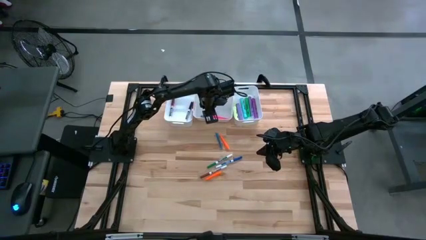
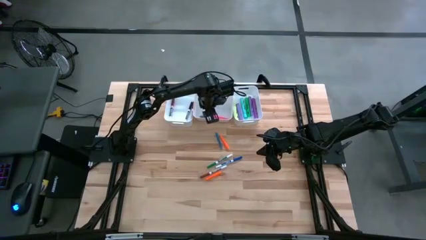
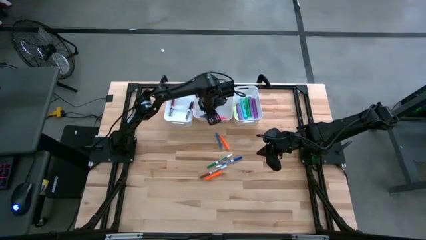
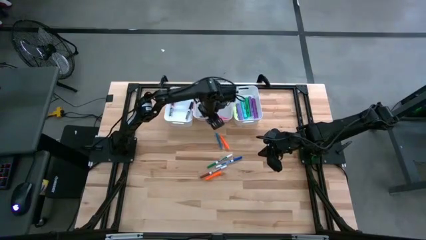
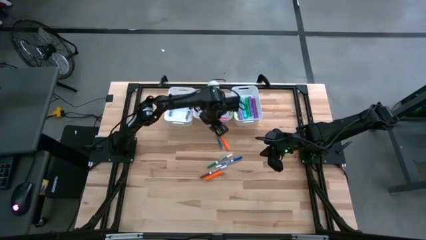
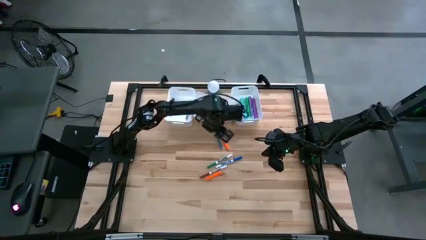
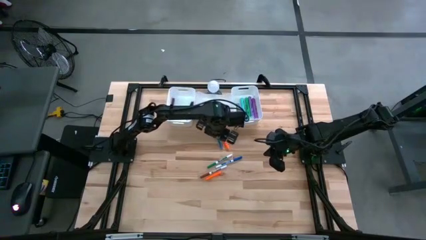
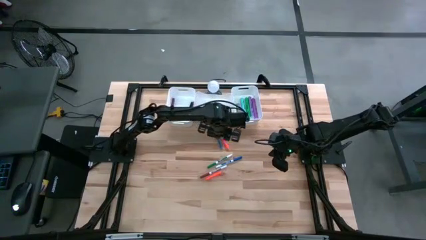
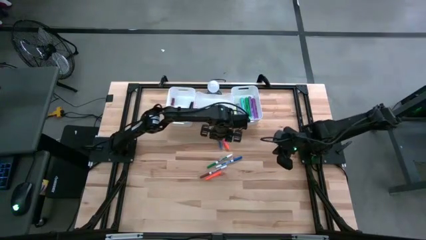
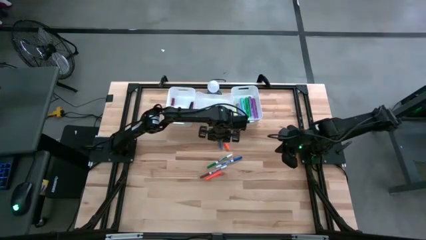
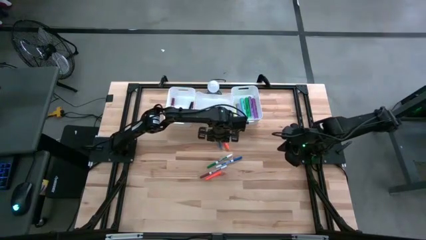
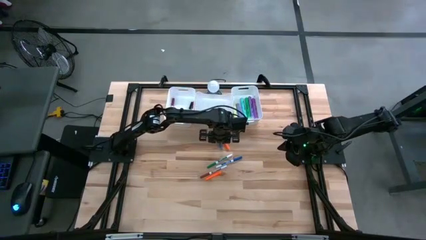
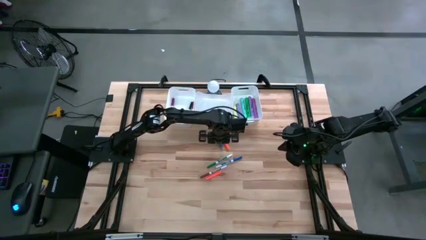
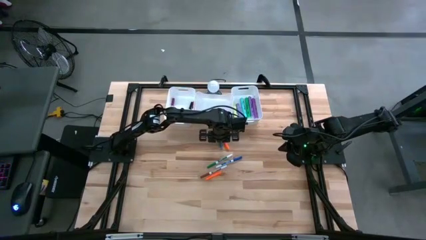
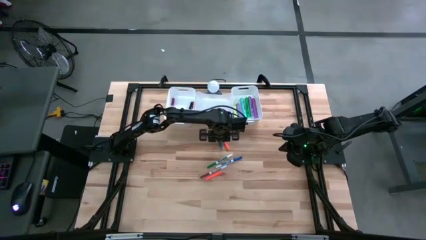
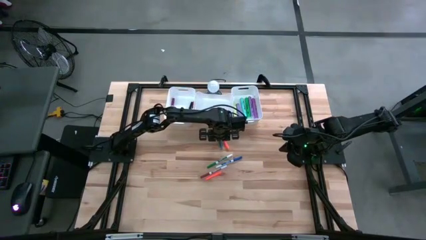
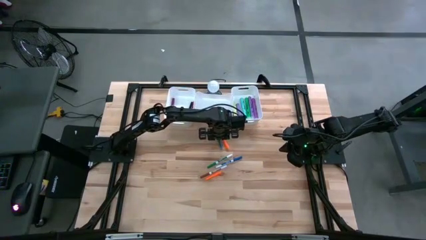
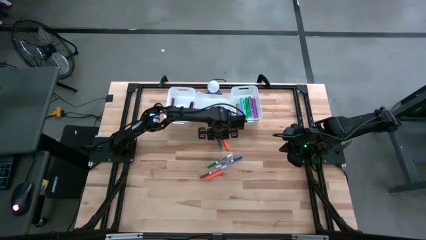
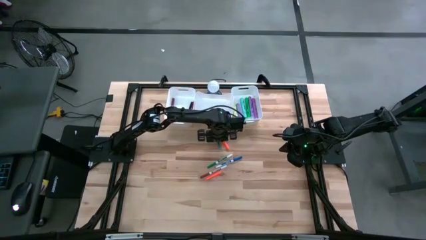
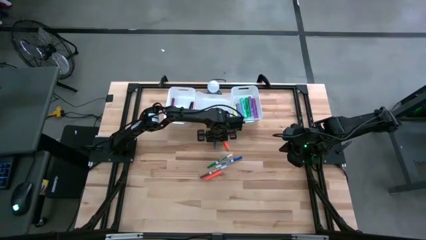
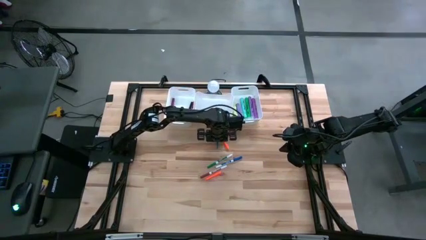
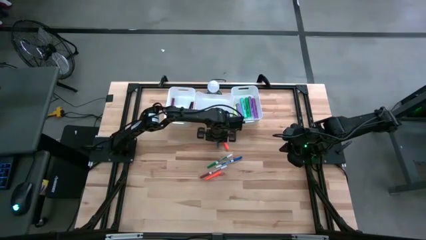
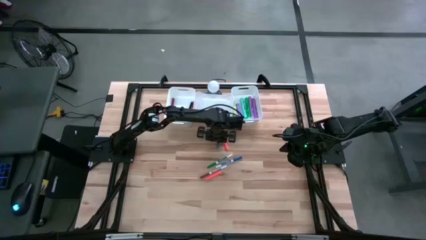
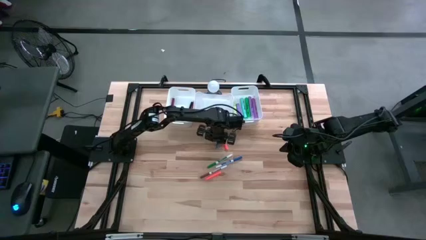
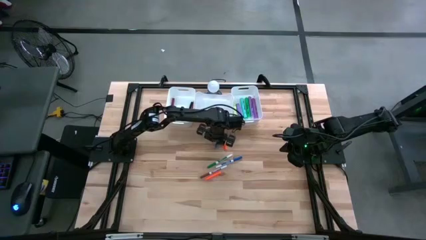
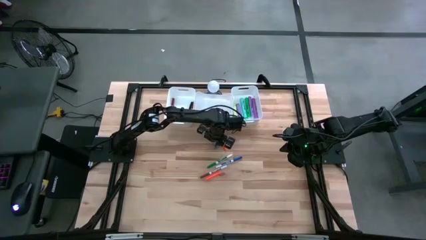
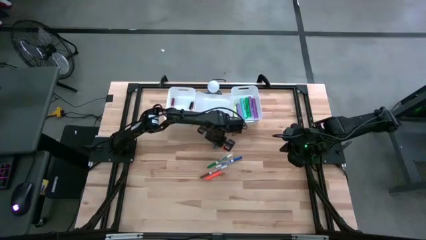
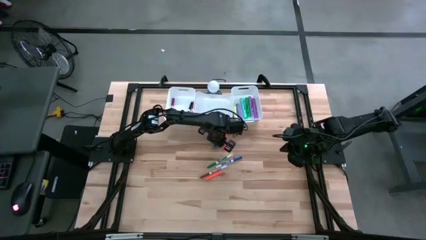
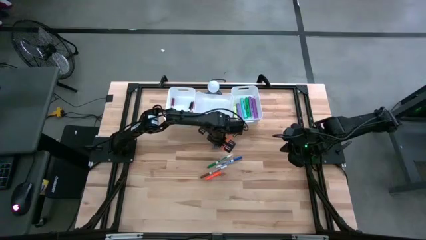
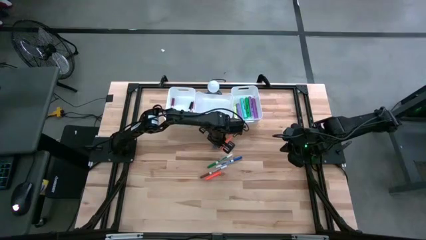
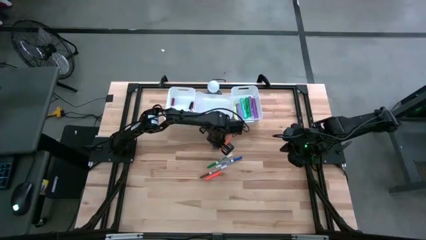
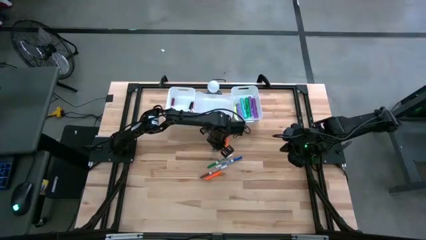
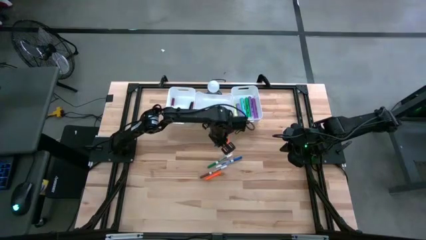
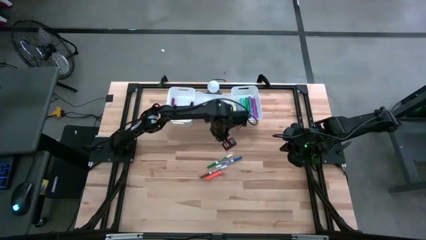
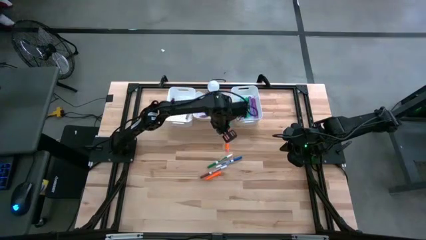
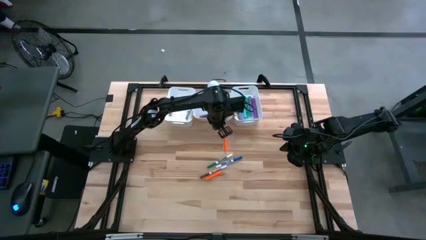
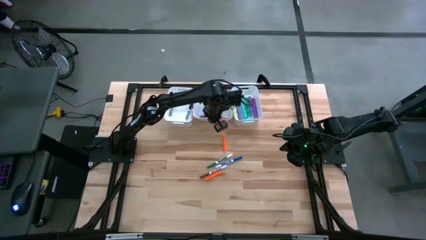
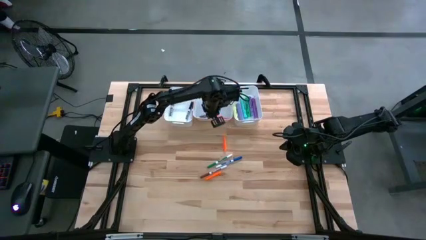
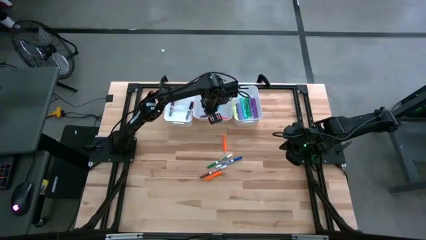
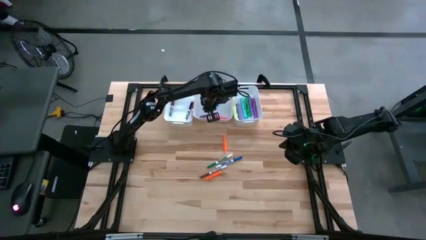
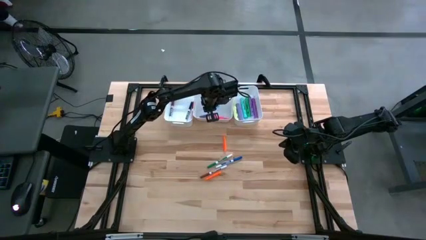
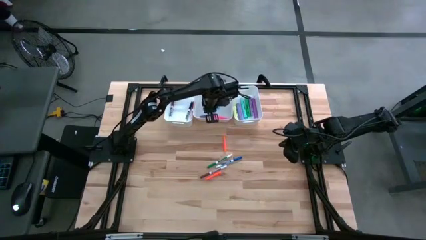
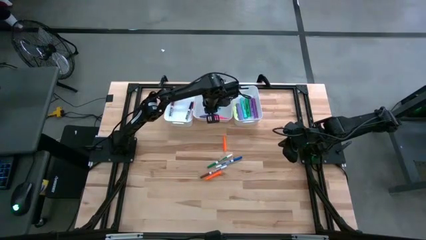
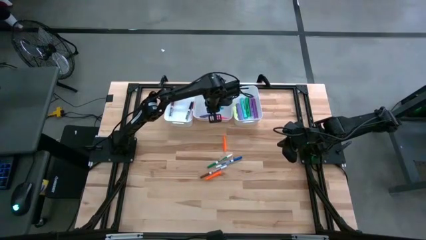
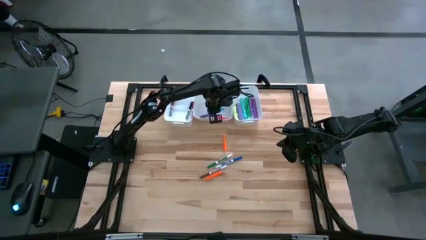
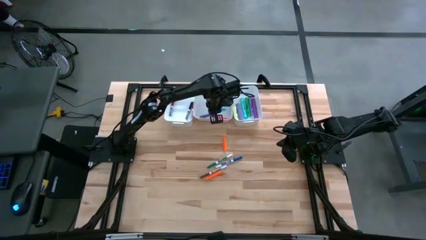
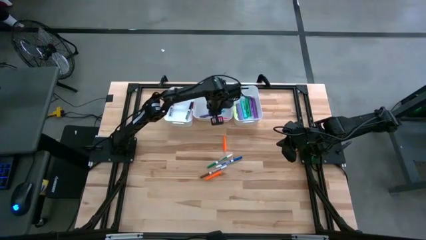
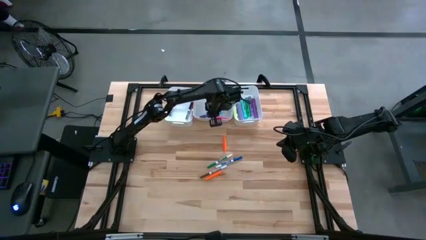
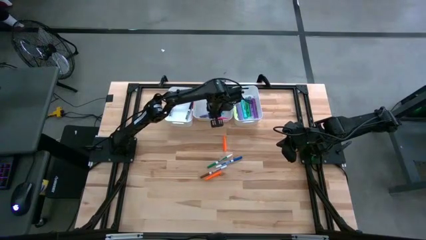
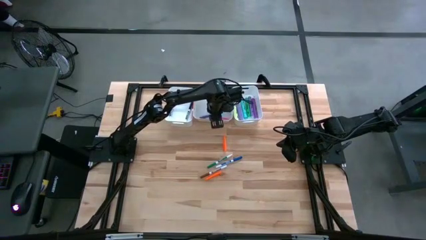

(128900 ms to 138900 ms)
Task: Pick & Place Markers
Put the blue pen into the middle white bin

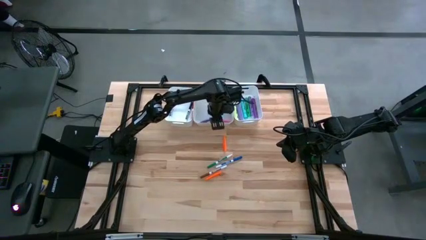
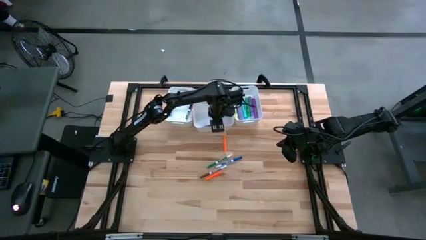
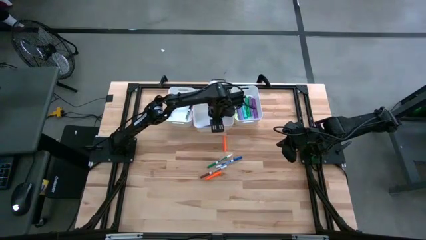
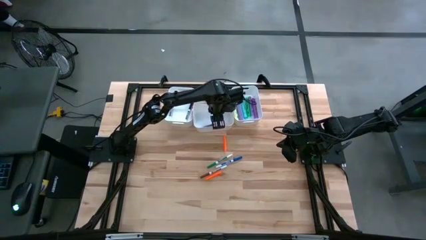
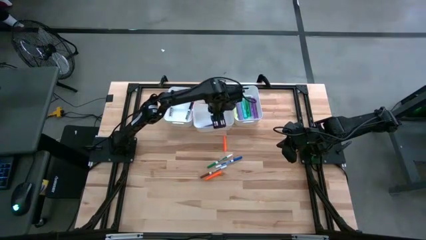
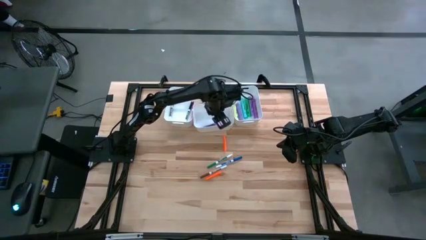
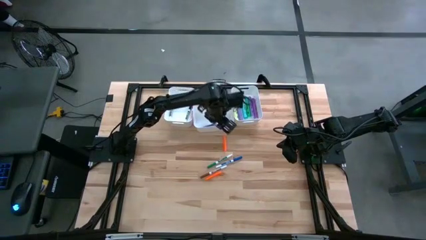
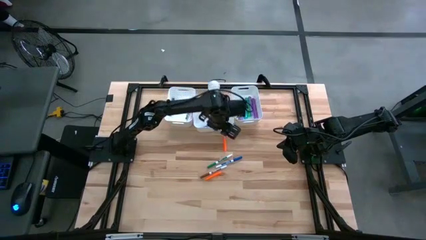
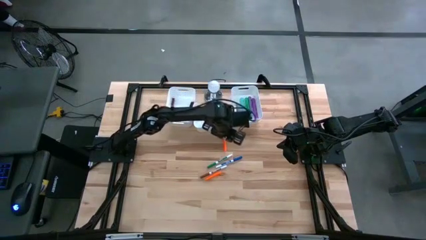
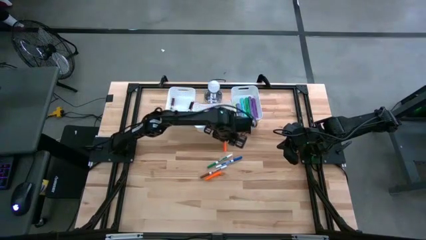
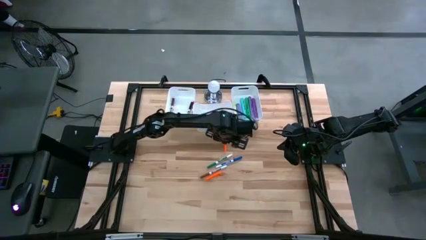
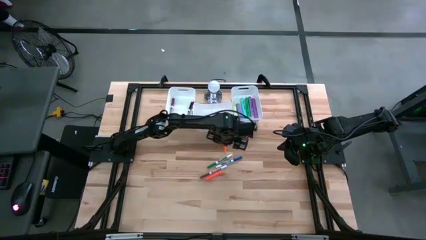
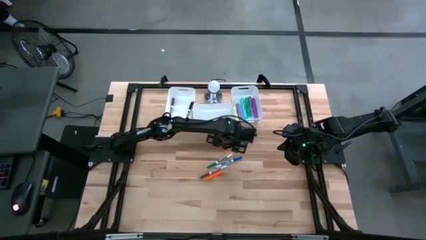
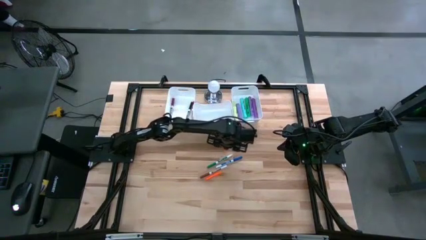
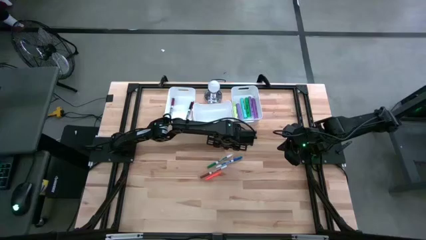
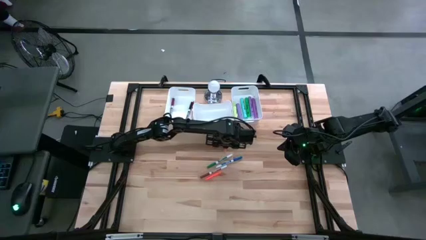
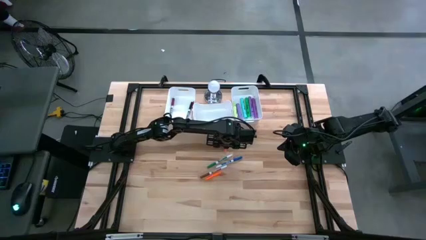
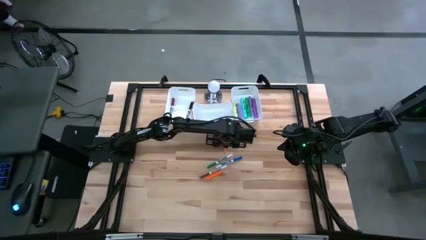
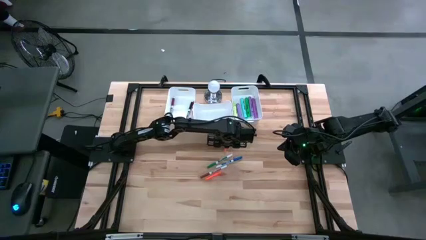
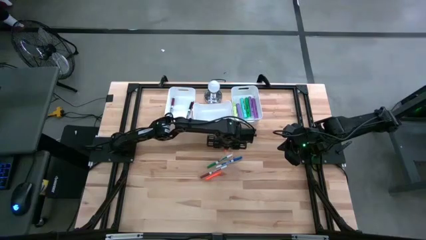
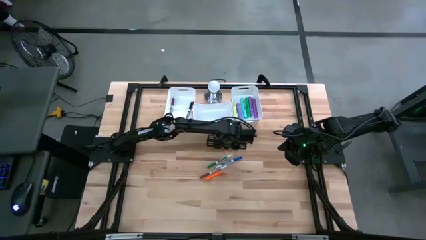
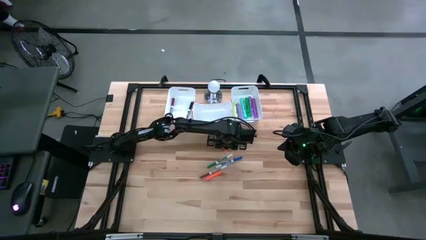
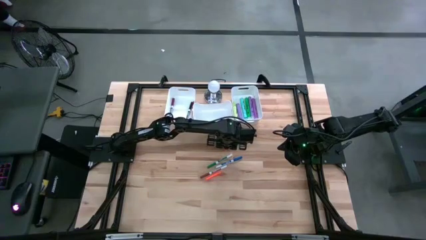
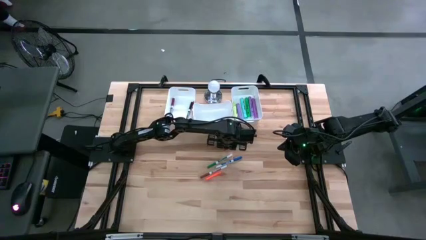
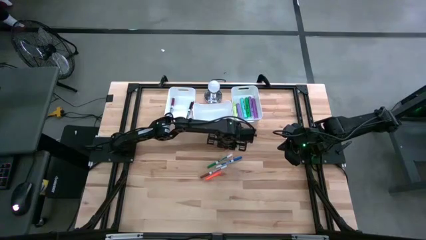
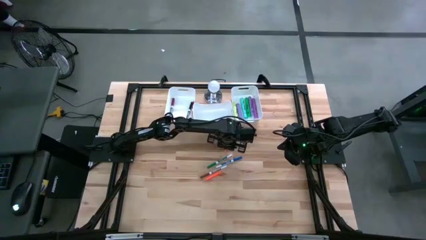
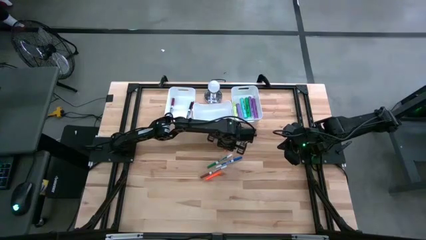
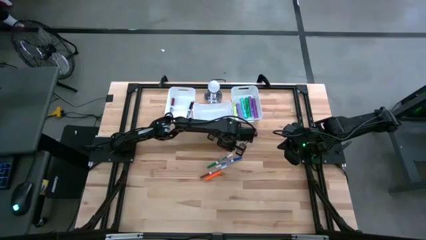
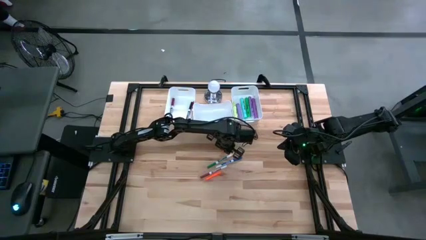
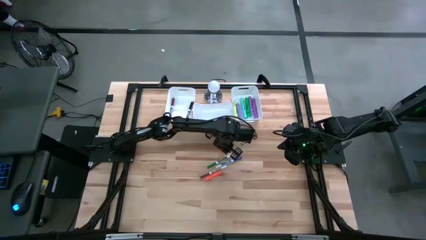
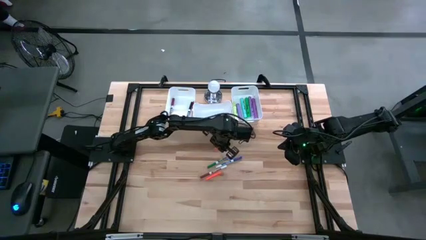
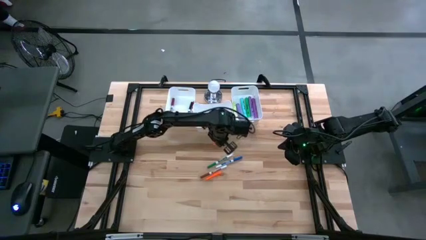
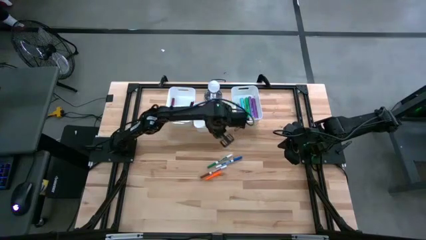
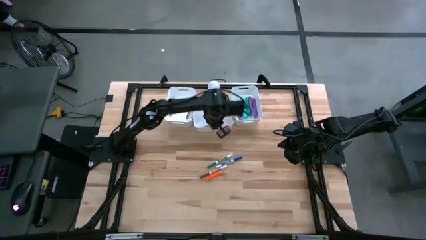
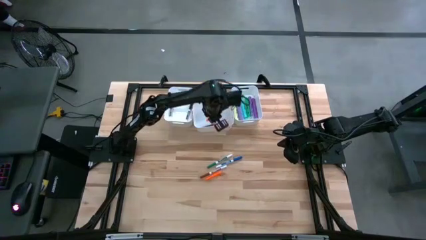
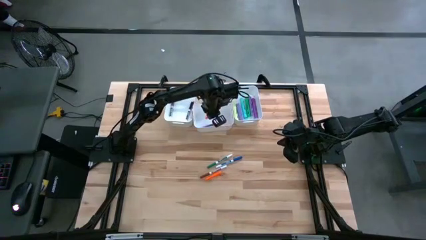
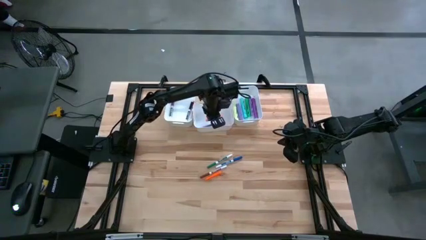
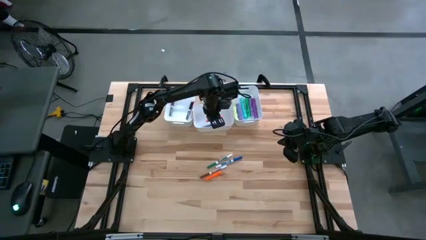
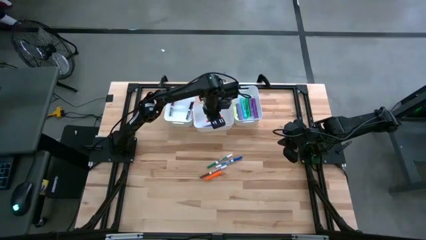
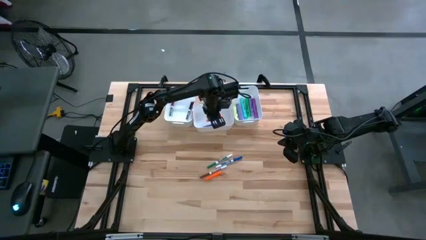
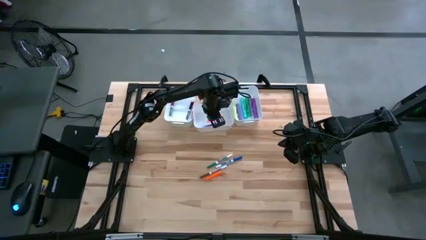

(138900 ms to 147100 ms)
Put the top orange pen into the middle white bin
